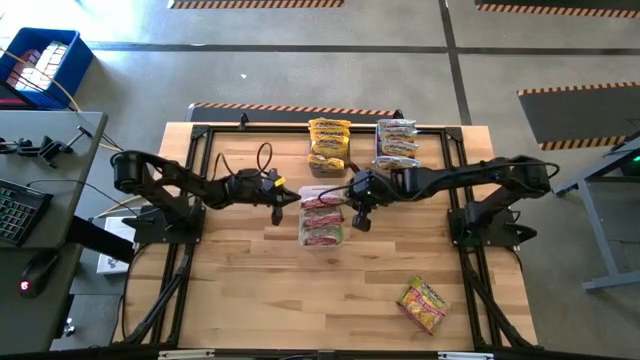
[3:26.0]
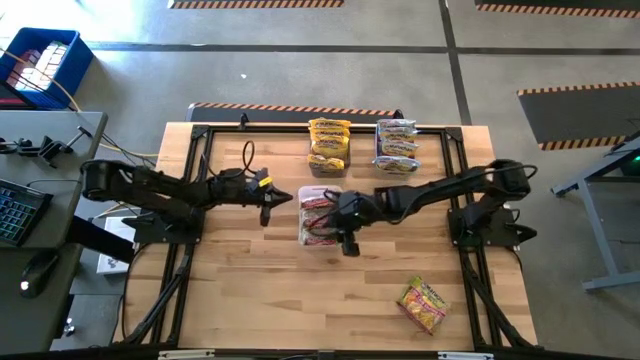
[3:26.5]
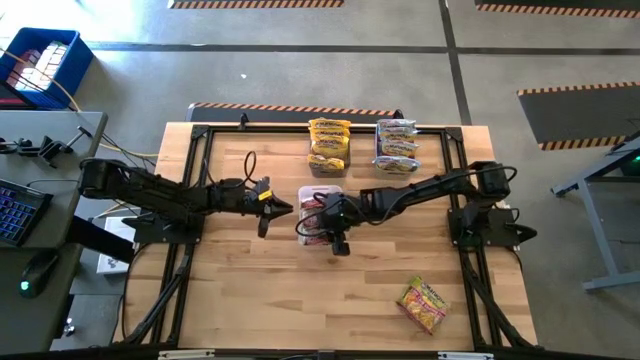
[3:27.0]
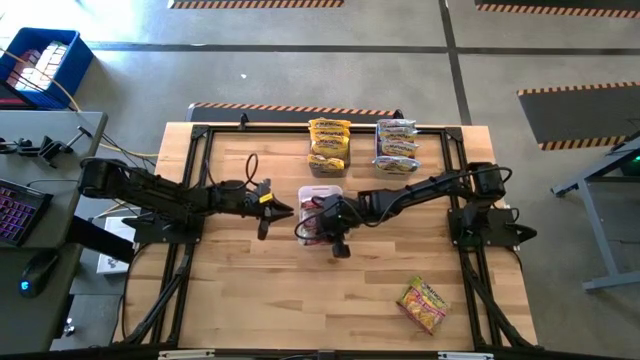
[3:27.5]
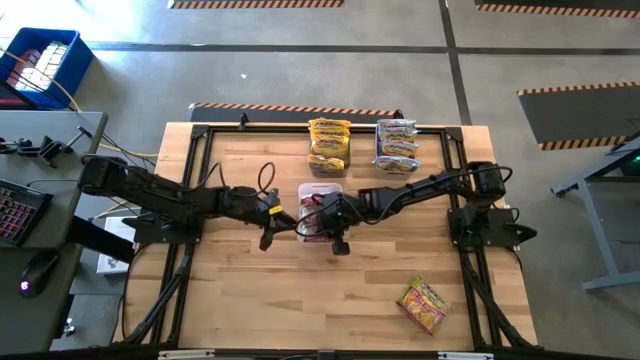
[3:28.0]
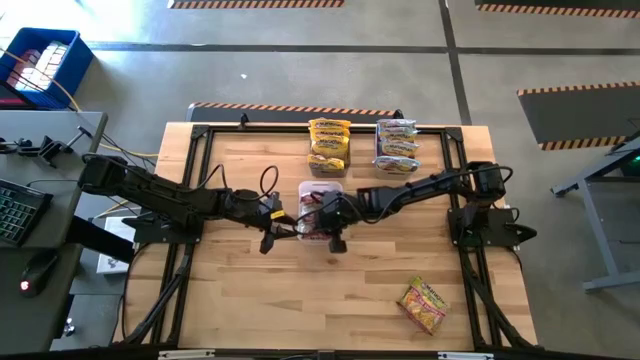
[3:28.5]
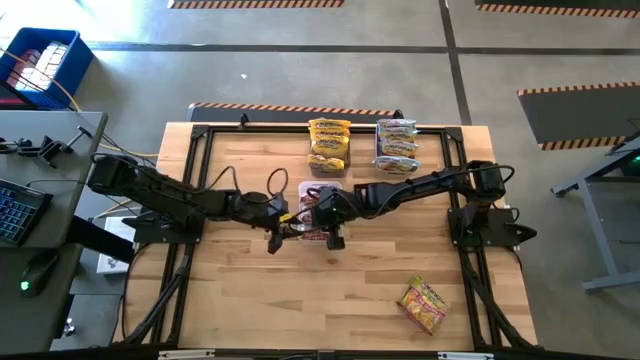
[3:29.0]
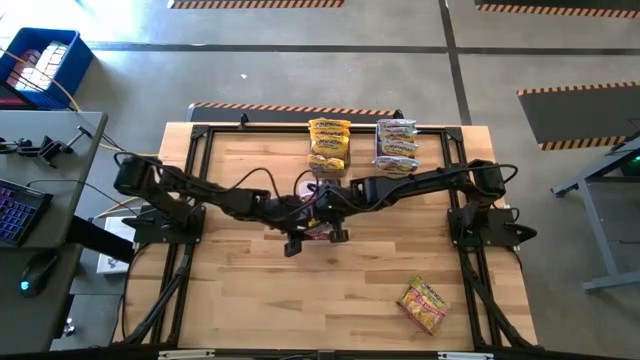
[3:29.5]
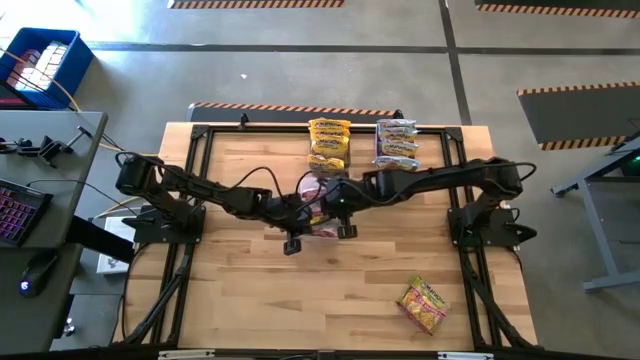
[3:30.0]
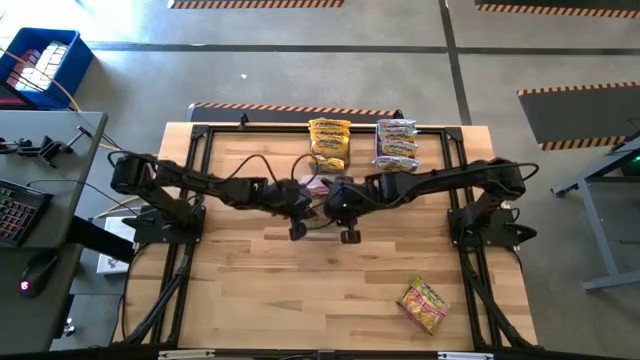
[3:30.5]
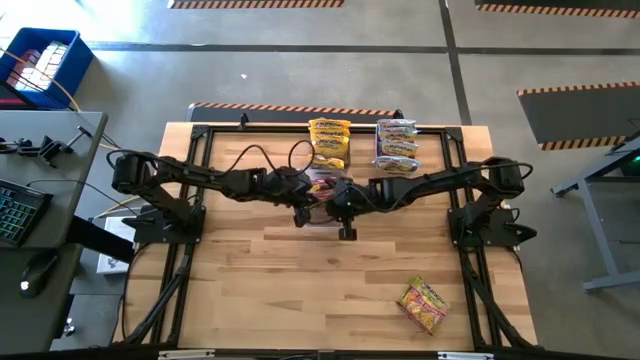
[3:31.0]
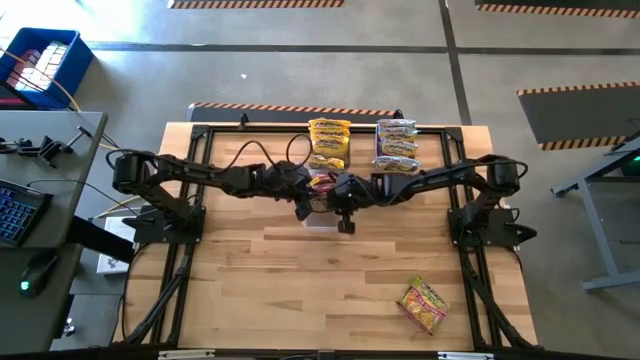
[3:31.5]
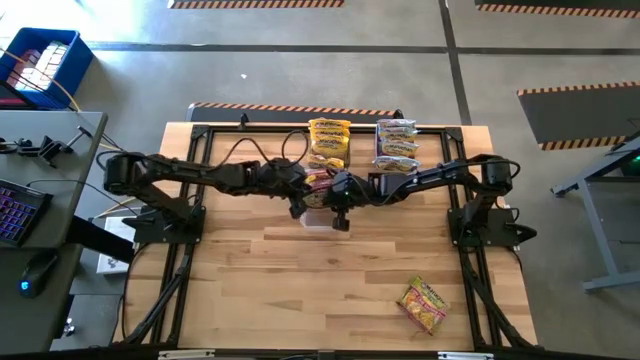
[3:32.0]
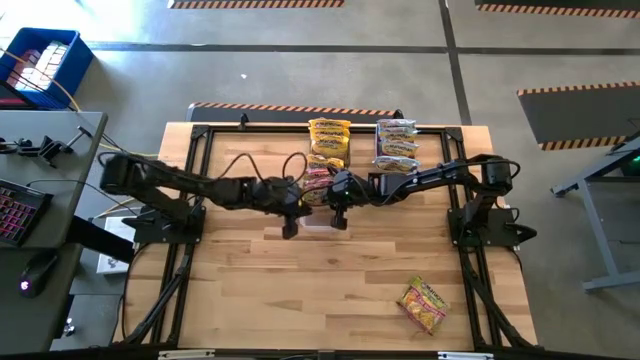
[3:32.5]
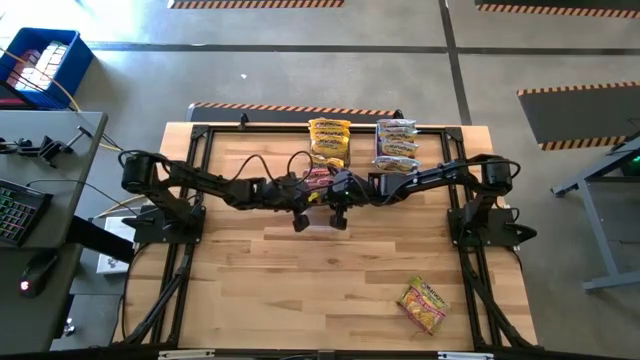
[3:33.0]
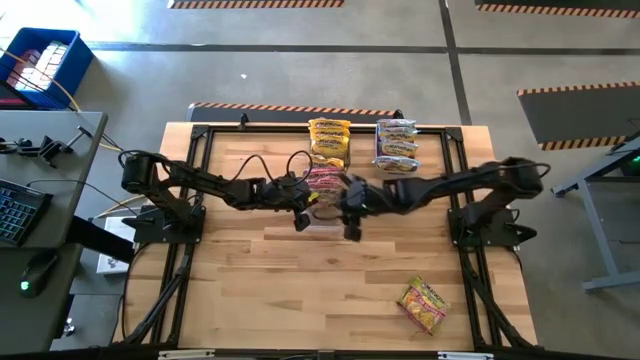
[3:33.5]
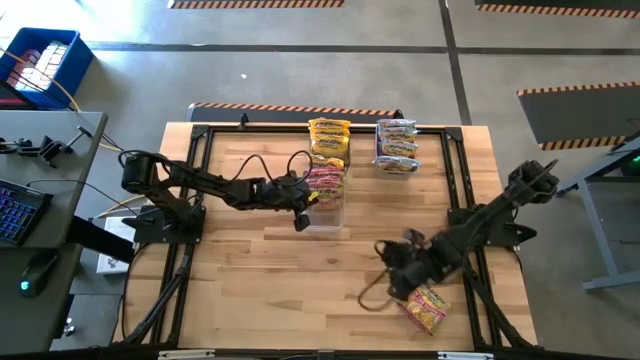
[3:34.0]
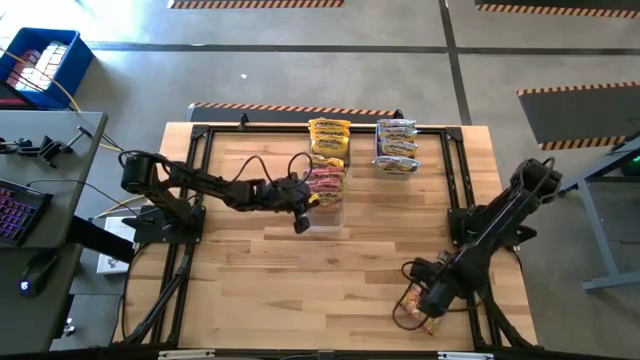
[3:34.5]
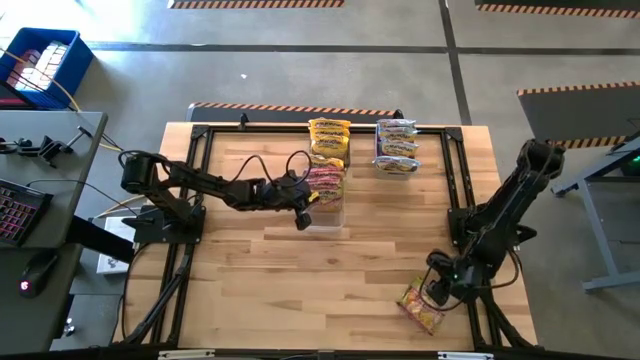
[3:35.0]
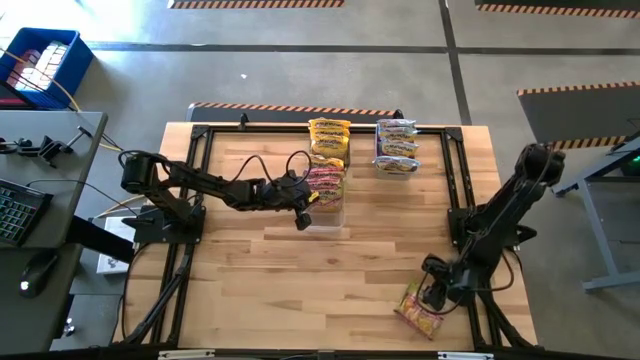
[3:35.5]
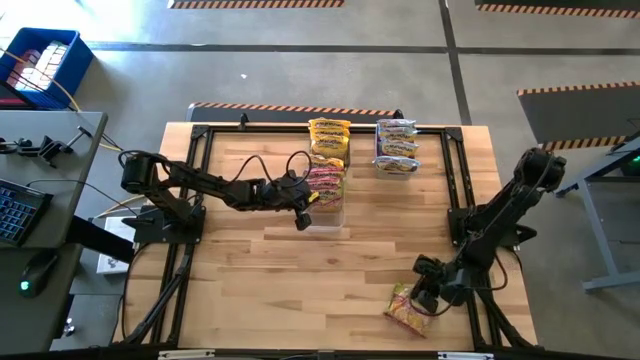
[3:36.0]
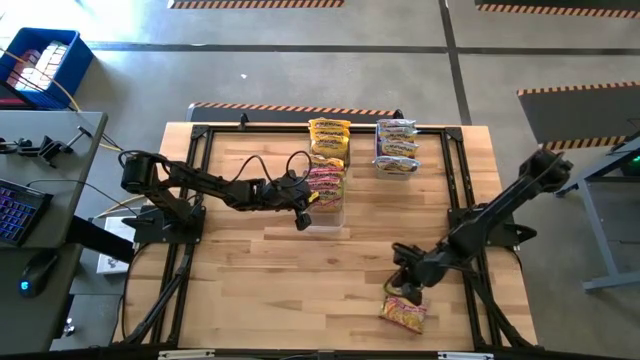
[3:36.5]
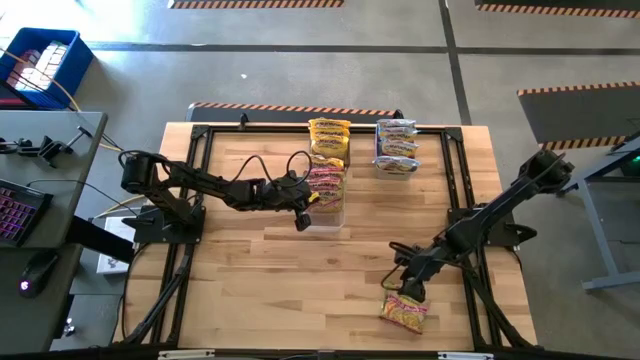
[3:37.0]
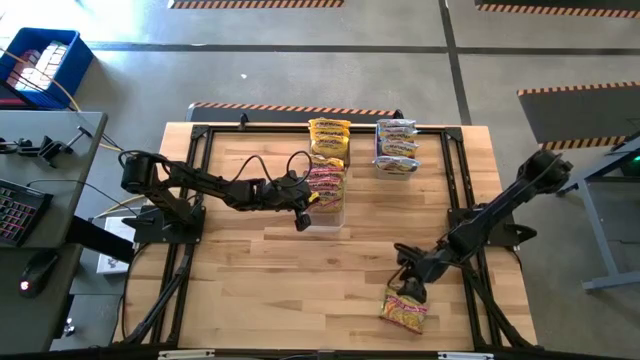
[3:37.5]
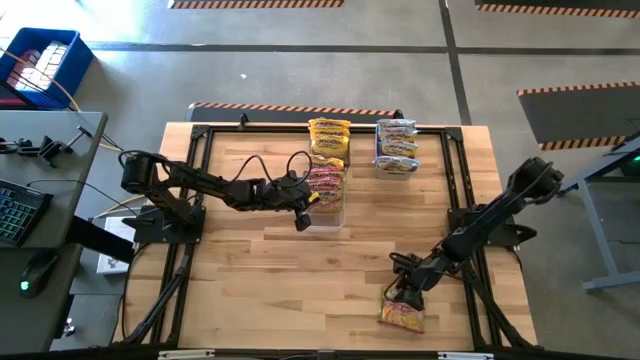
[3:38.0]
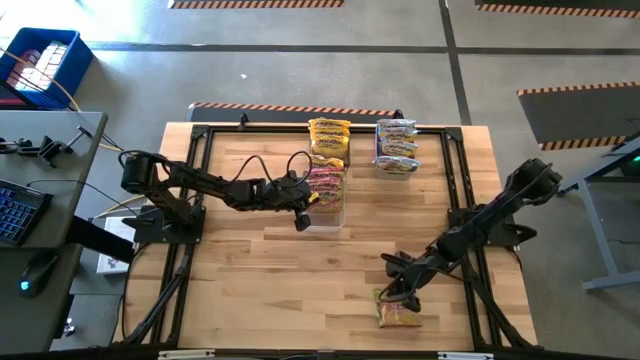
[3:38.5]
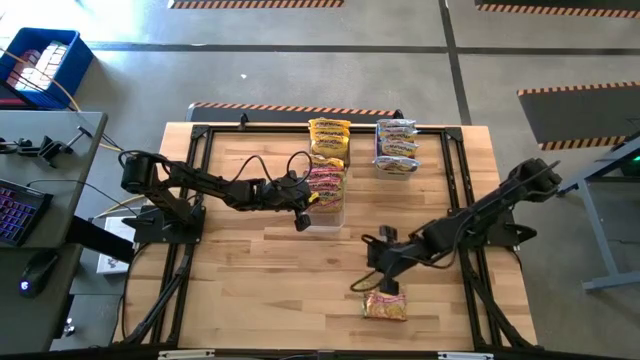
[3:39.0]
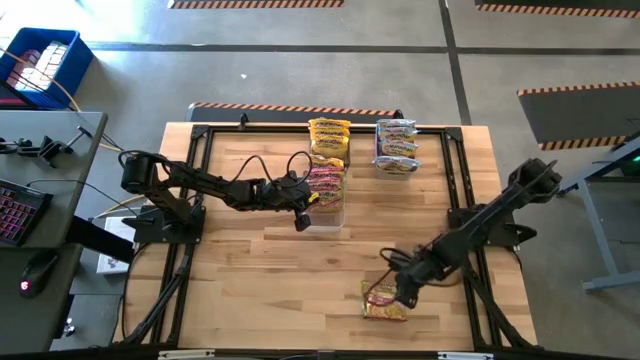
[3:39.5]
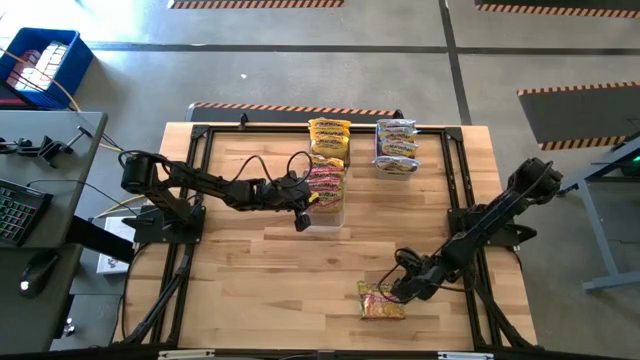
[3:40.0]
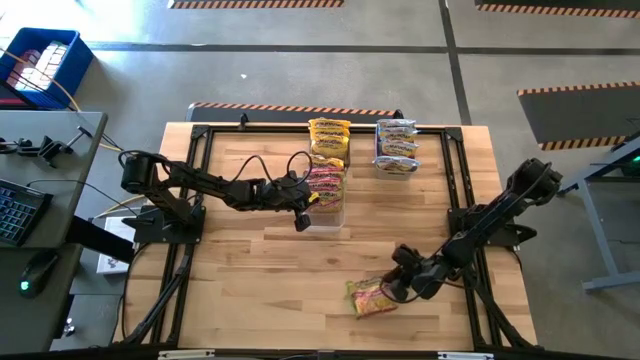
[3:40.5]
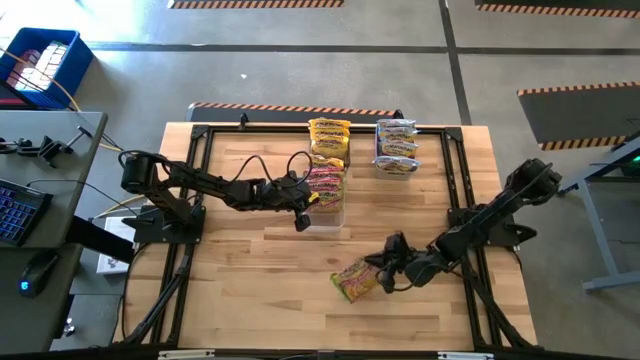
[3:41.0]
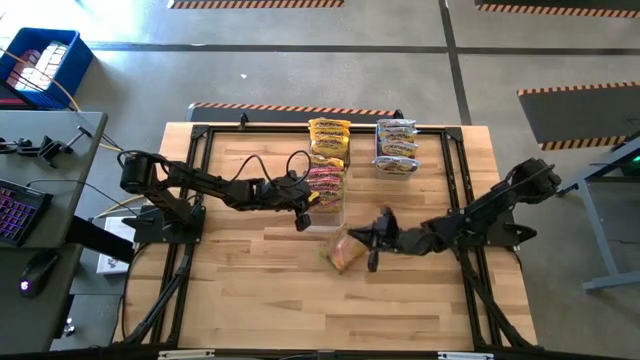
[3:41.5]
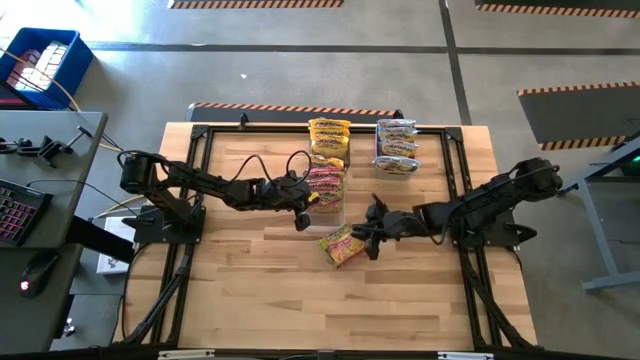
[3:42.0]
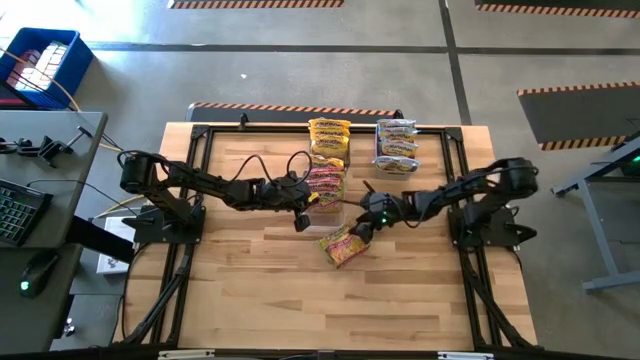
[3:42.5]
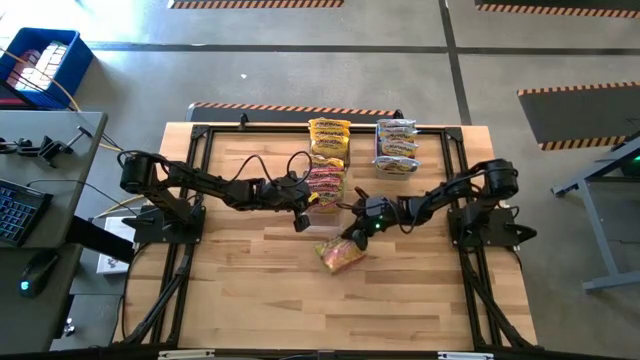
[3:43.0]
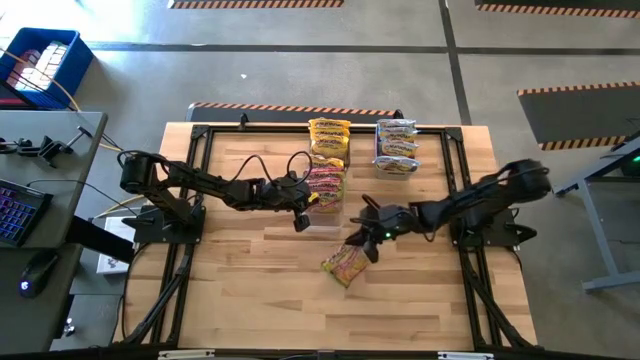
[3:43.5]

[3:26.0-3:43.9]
Task: Sort Maruchan noodles
Put the green noodle pack into the transparent bin

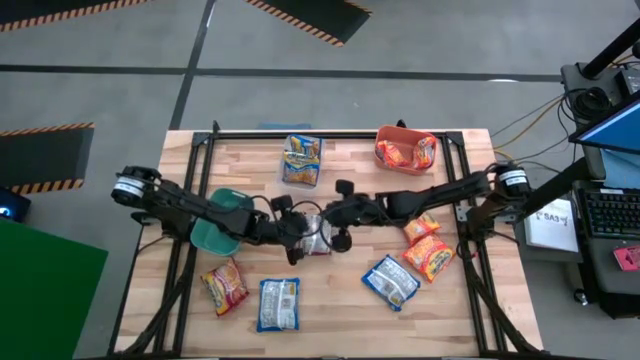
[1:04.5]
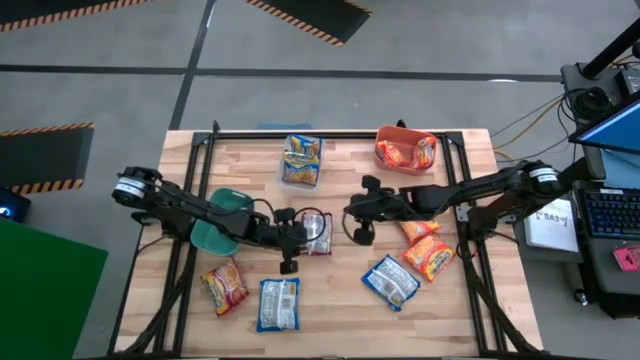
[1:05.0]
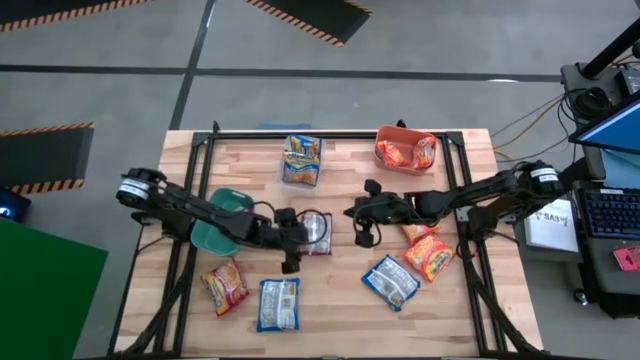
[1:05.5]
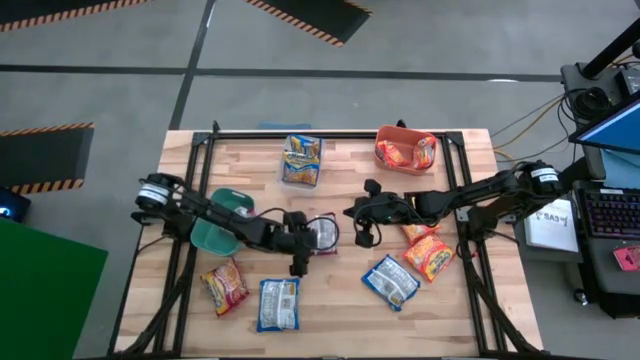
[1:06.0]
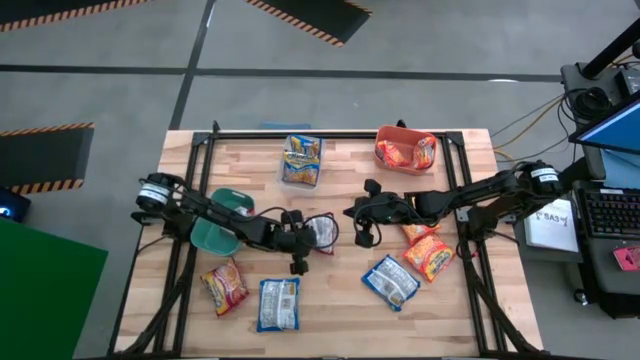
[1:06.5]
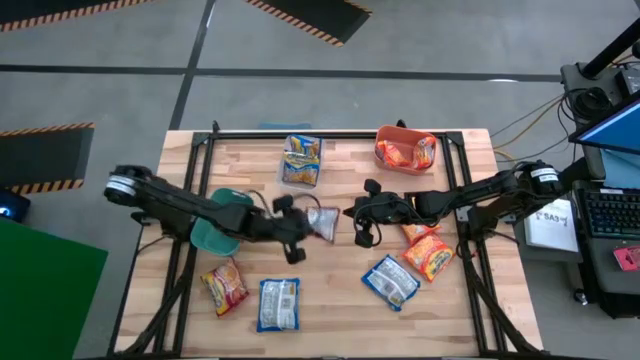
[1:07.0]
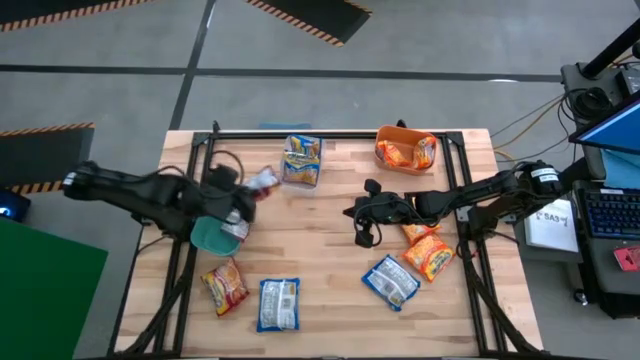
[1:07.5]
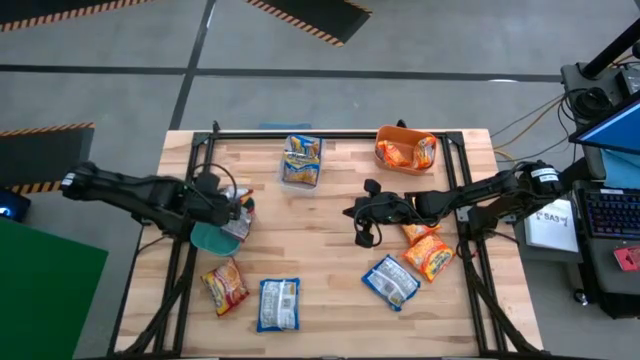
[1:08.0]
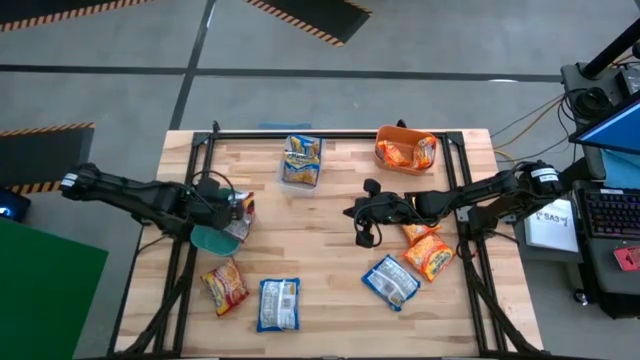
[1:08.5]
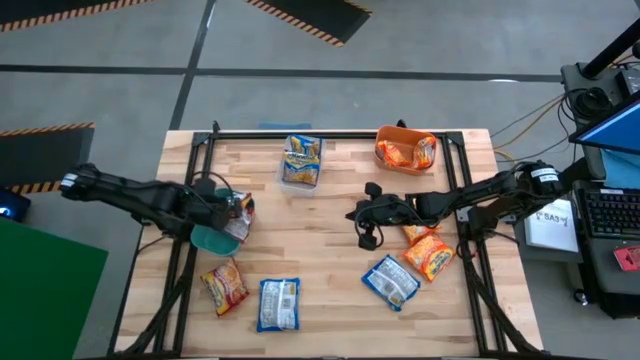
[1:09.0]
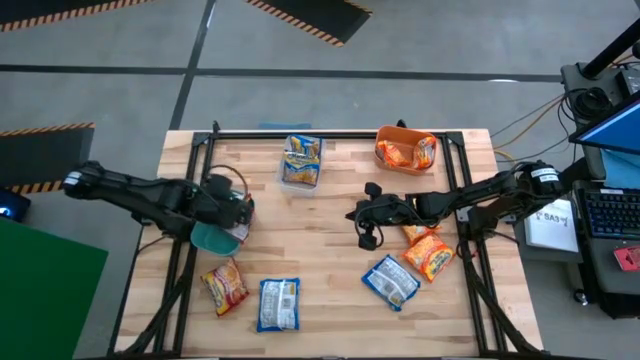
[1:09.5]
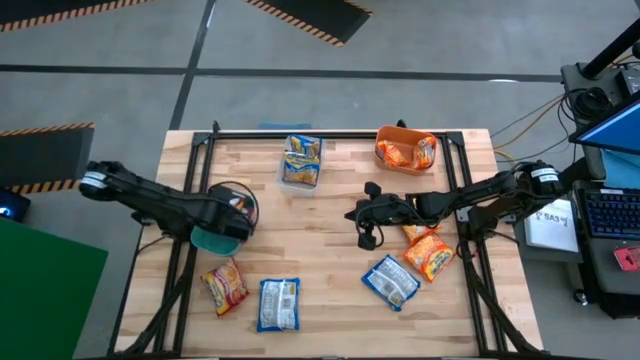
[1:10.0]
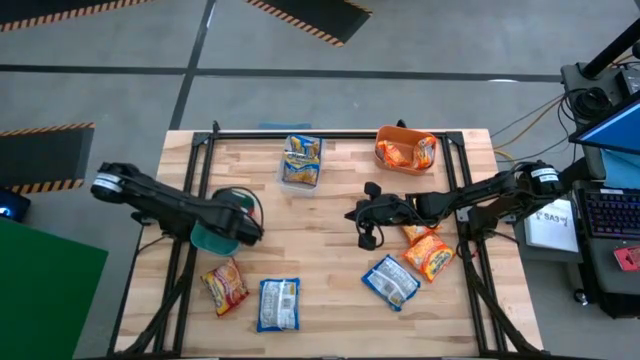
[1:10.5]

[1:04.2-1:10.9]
Task: Sort Maruchan noodles
Put the red noodle pack in the blue bin
